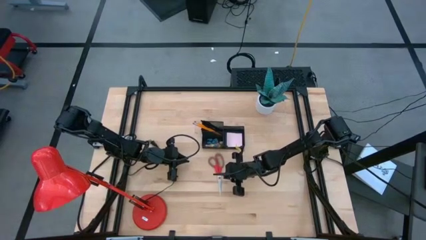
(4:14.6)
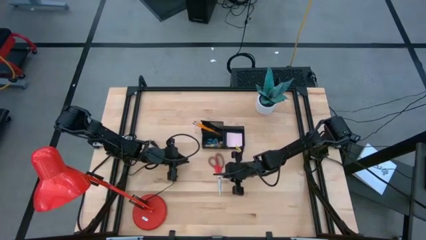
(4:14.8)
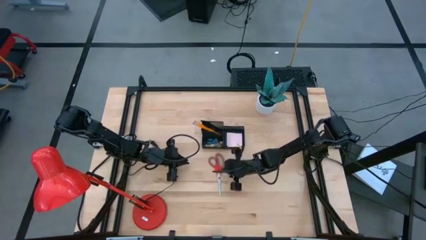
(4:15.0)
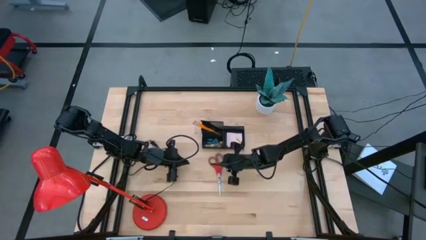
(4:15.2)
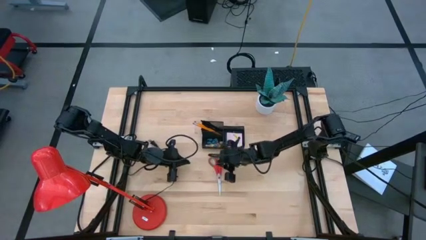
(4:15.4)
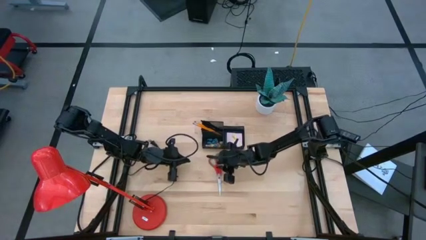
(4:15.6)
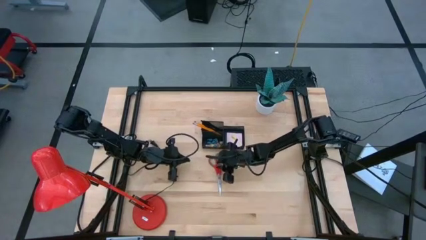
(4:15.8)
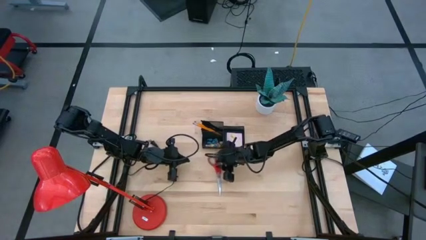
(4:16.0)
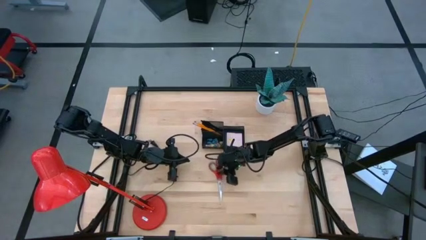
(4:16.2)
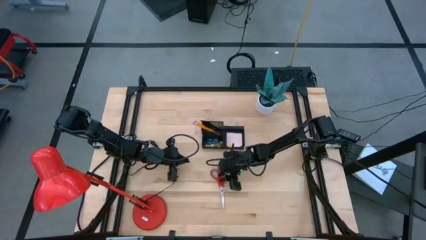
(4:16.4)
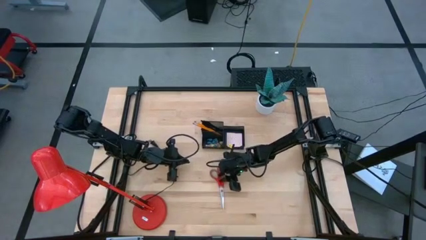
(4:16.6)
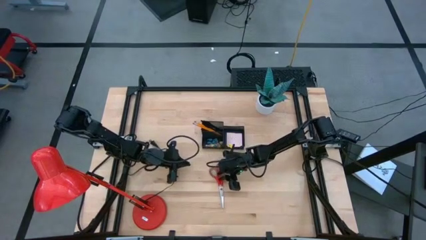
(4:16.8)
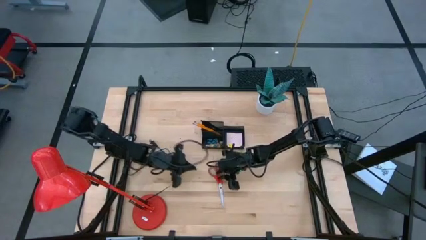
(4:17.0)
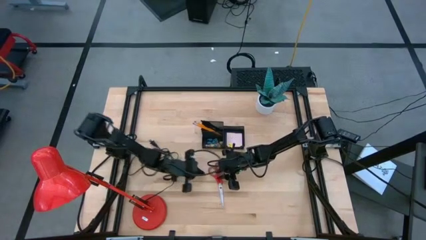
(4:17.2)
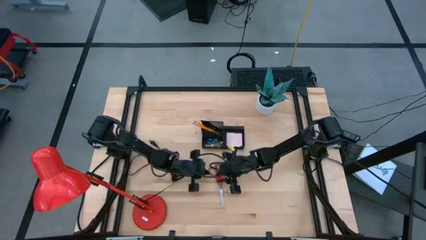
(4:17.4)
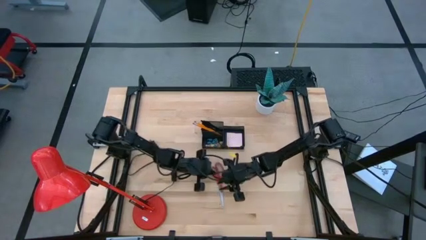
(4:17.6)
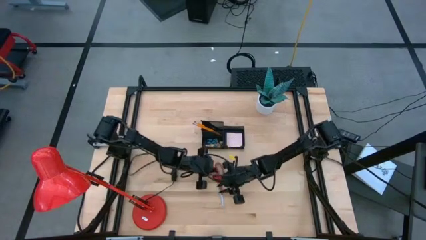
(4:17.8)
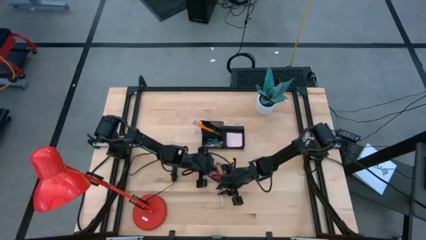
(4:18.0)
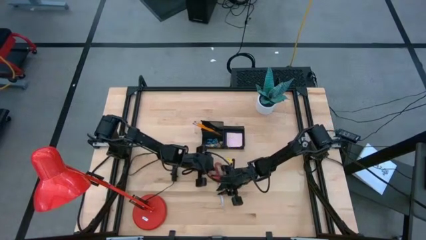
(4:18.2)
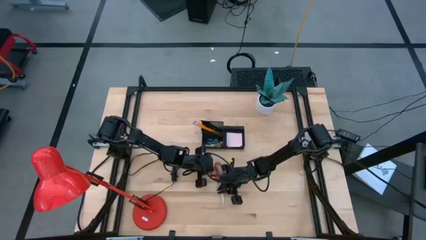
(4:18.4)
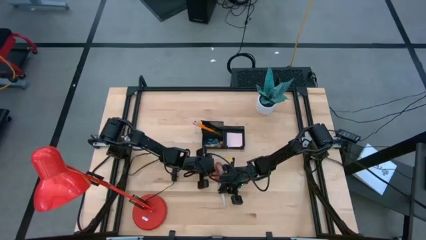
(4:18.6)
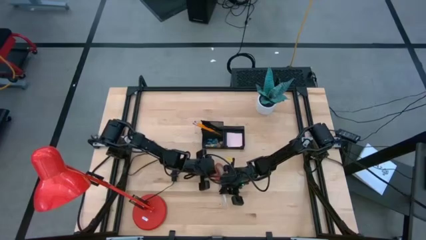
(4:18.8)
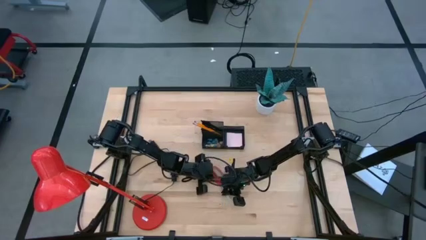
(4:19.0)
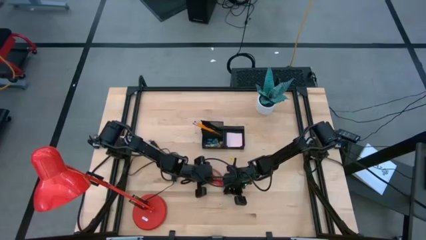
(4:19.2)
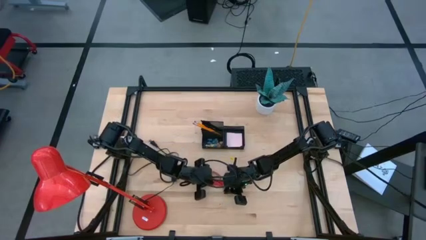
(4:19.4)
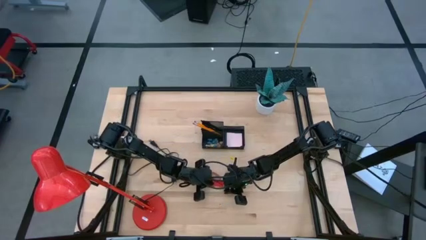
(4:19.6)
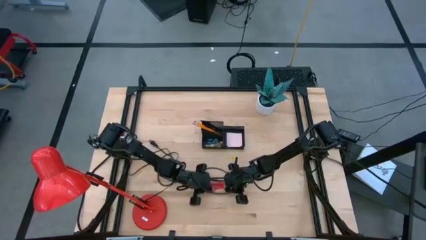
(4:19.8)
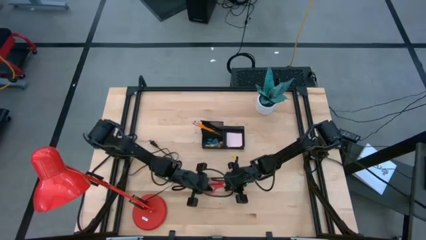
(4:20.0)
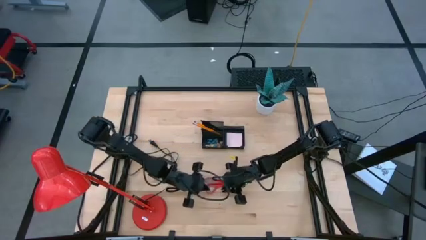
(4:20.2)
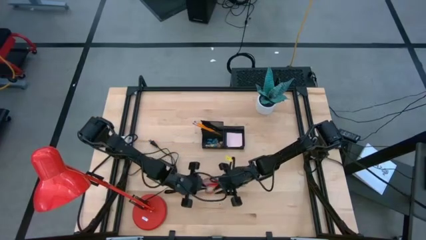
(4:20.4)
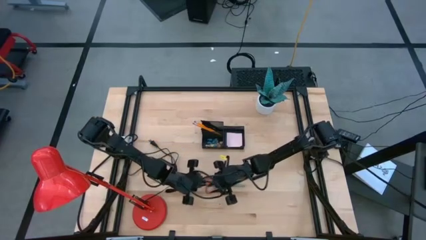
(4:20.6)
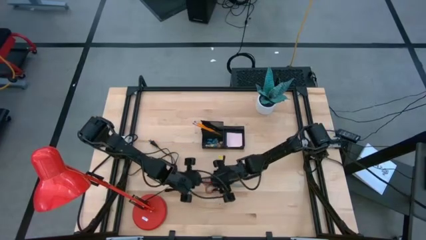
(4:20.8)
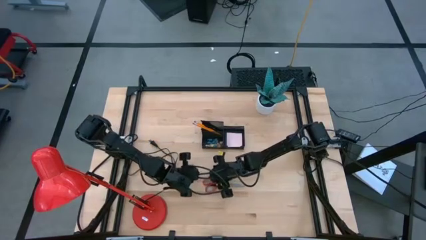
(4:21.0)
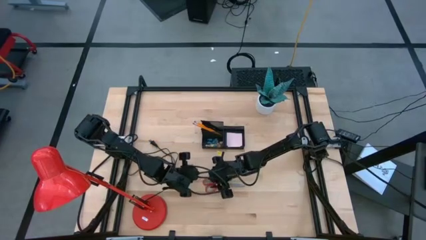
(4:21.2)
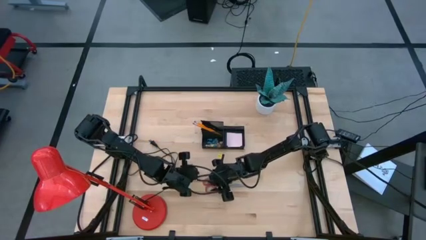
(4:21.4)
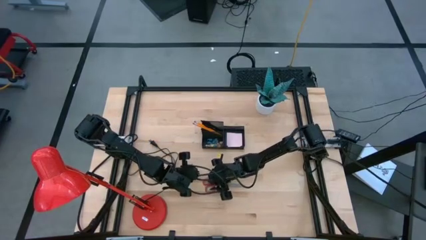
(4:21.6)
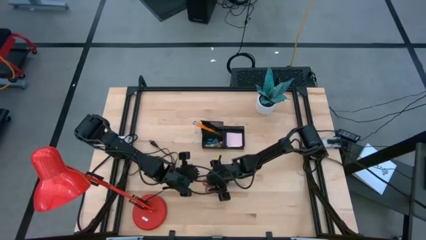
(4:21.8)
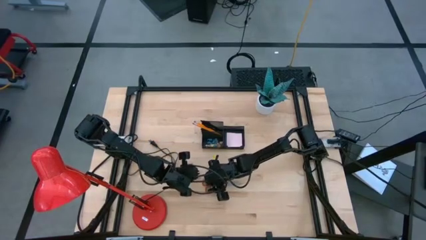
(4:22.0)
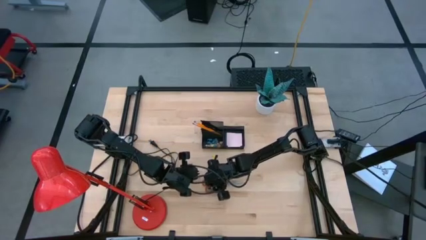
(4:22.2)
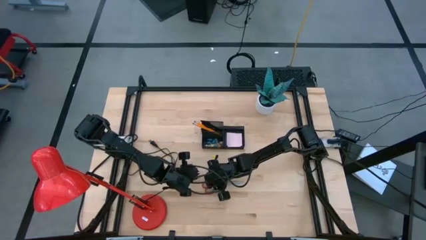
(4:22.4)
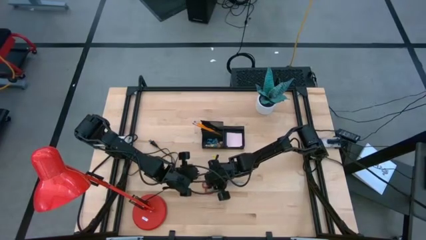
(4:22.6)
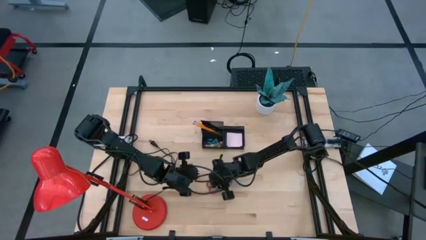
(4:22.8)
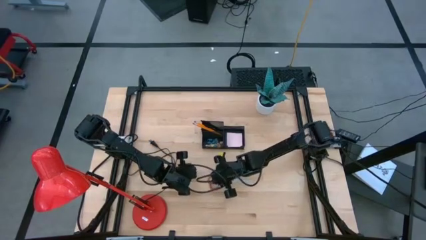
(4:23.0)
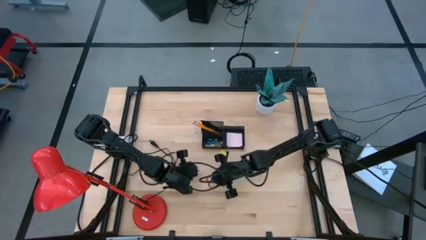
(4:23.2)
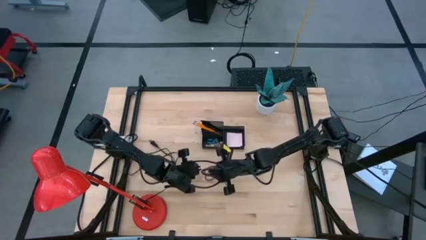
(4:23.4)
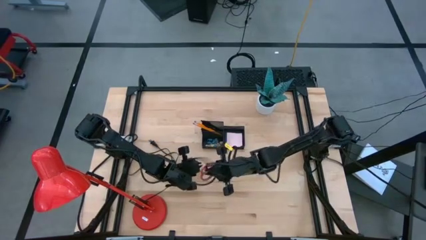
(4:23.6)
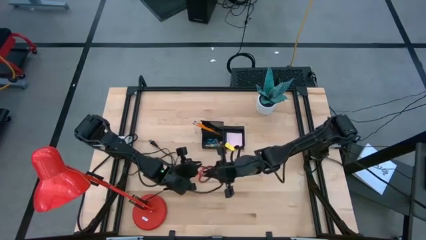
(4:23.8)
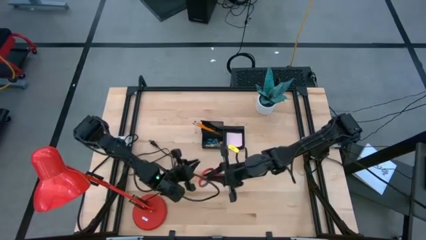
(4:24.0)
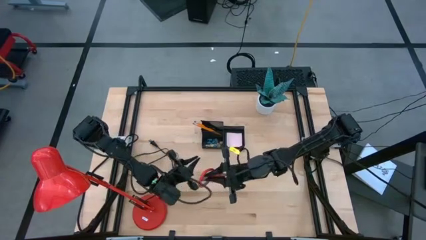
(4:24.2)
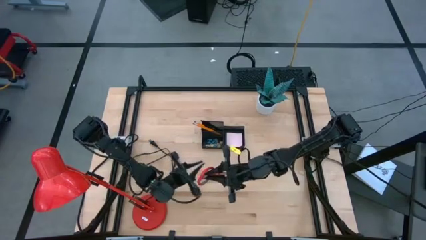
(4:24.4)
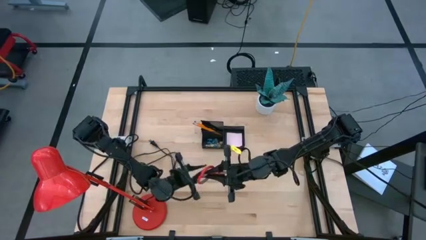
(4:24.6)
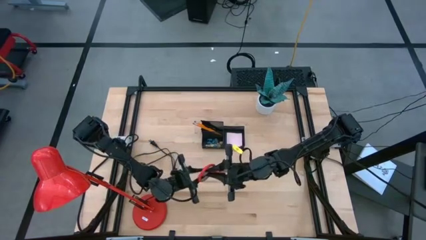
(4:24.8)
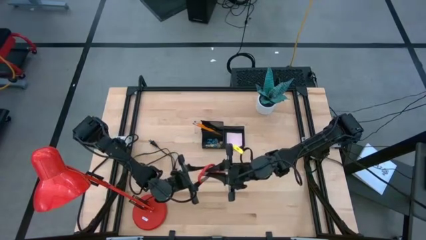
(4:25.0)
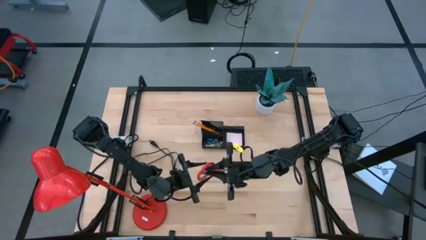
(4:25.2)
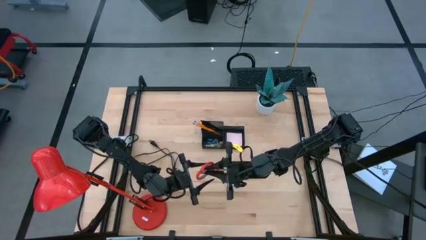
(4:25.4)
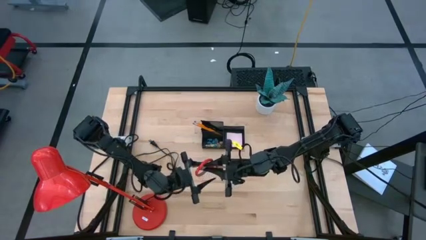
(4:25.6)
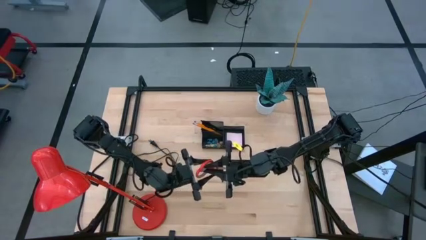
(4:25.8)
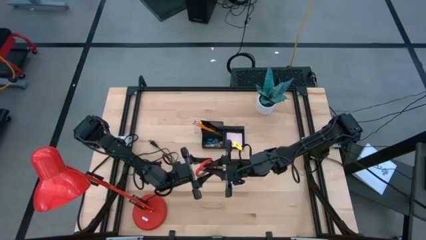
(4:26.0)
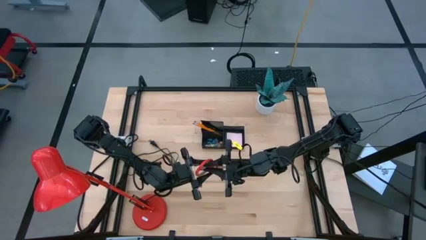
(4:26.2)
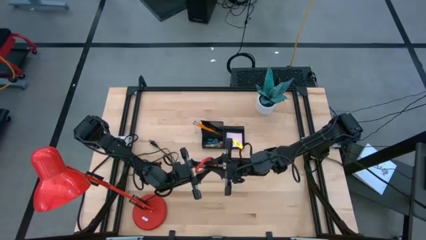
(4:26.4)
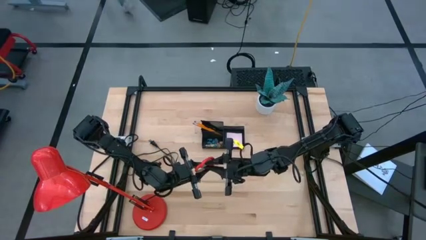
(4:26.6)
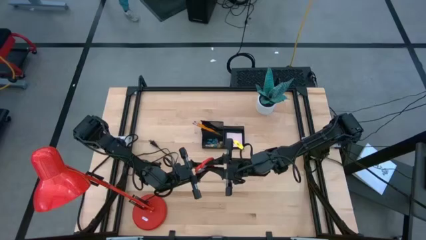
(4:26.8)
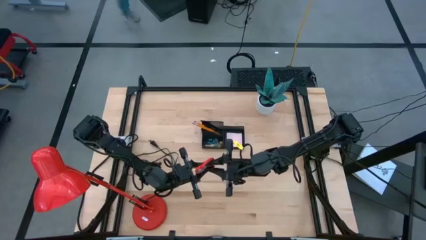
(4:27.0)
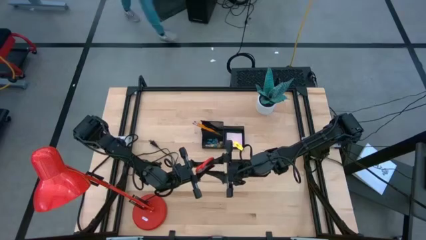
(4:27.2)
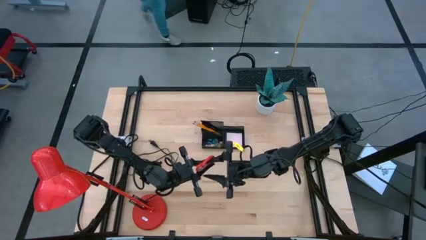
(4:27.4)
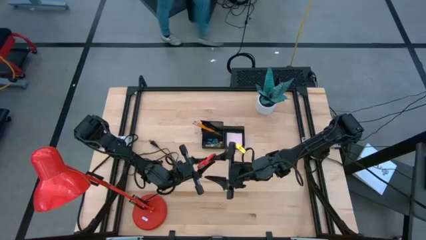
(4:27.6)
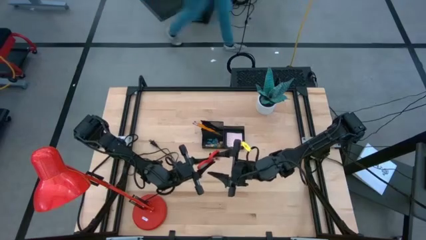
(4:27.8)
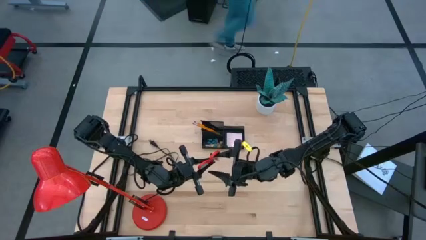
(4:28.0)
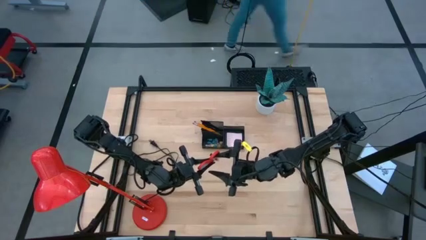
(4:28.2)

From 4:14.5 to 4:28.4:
Task: Pick and place office supplies into organizer
Put the red scissors into the black desk organizer

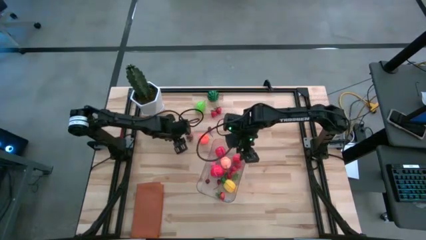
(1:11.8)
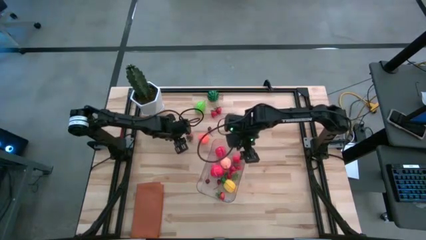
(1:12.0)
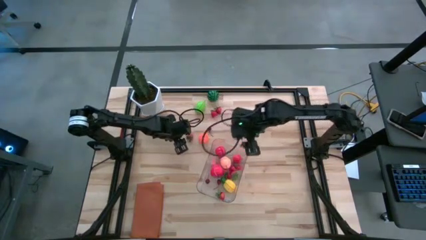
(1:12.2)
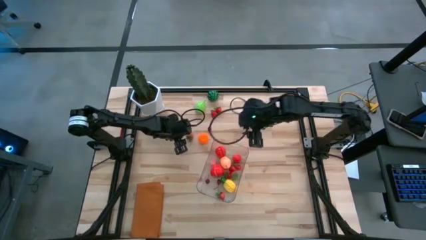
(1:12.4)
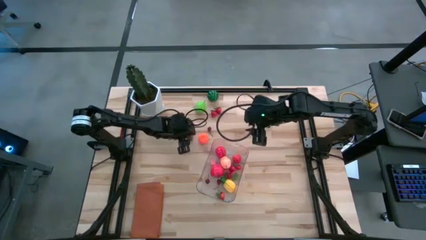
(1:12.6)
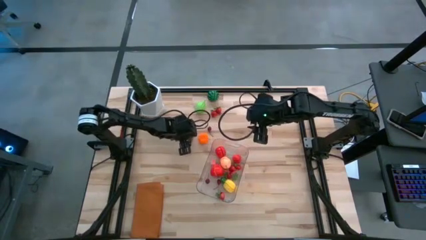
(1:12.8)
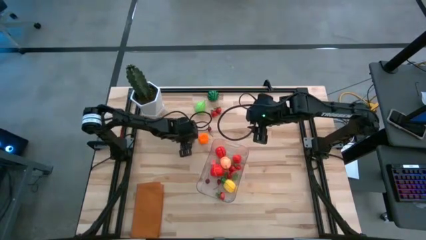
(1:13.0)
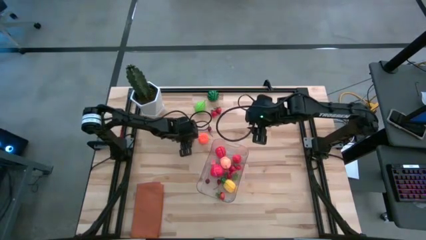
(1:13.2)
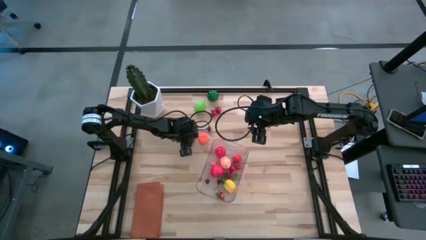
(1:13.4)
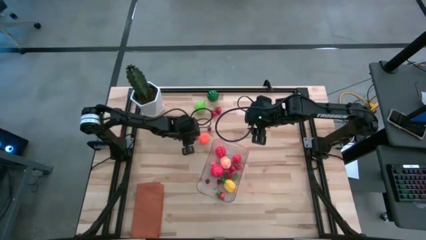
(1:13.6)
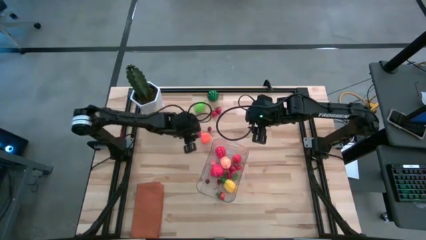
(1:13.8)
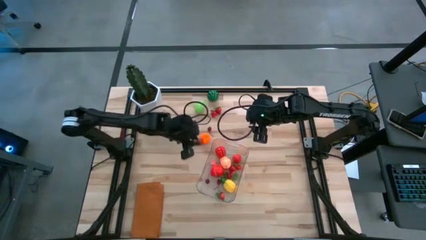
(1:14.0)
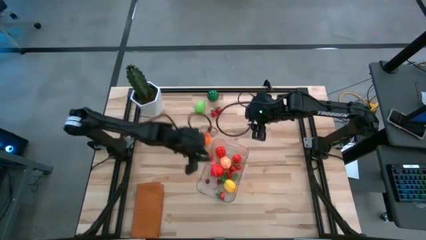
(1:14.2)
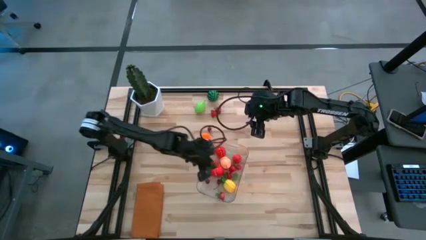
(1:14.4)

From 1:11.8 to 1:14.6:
Task: Pick and placing Produce into tupperware
Put the red strawberry into the transparent bin
